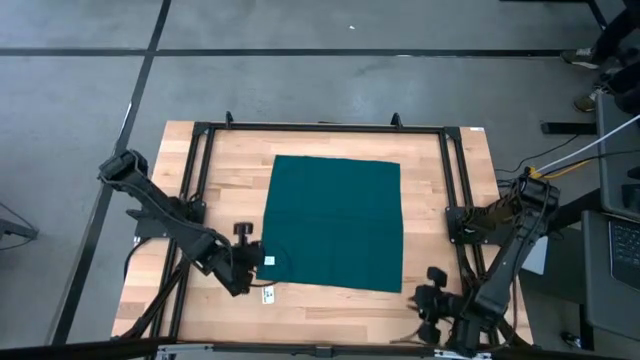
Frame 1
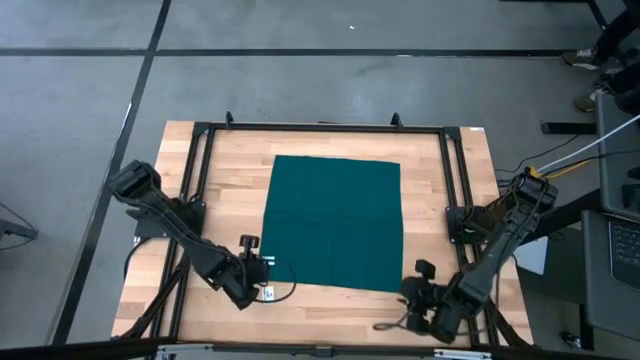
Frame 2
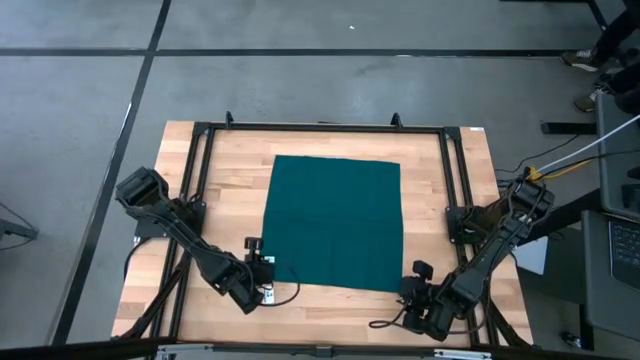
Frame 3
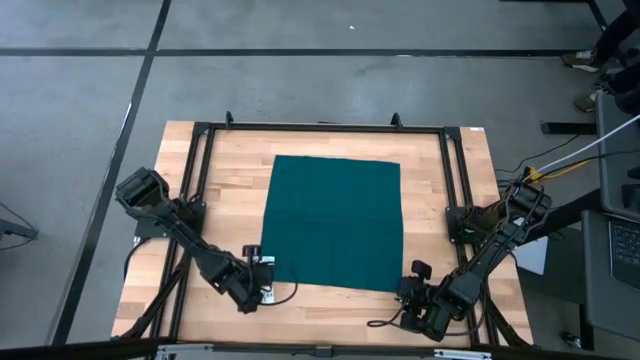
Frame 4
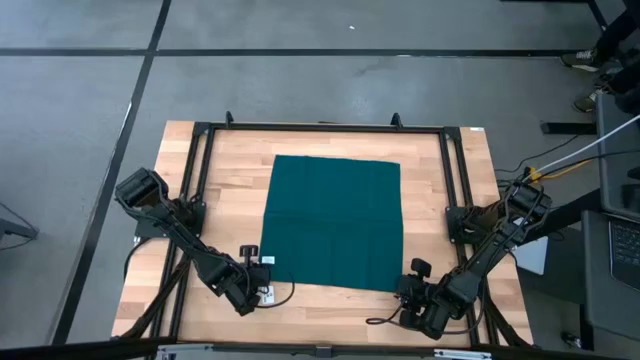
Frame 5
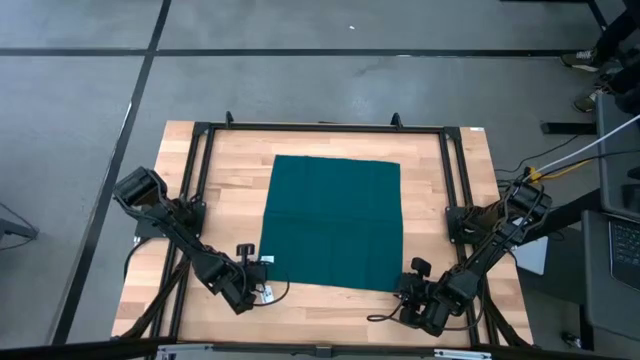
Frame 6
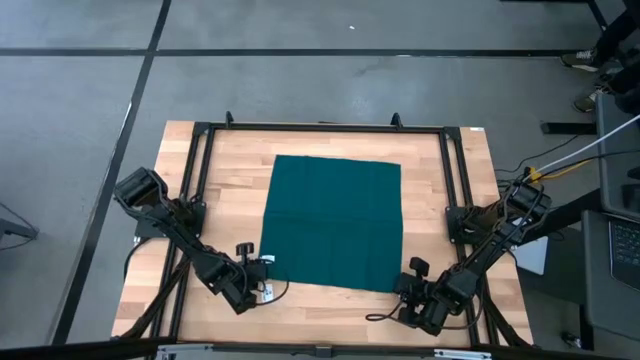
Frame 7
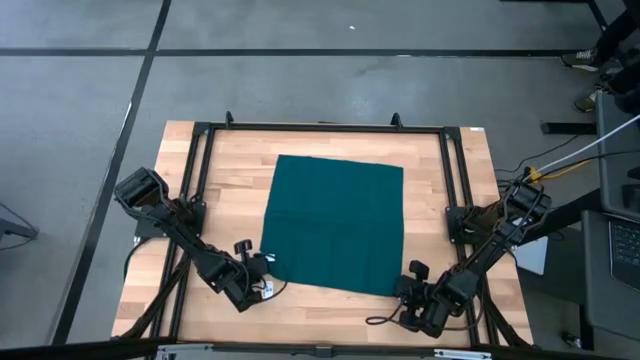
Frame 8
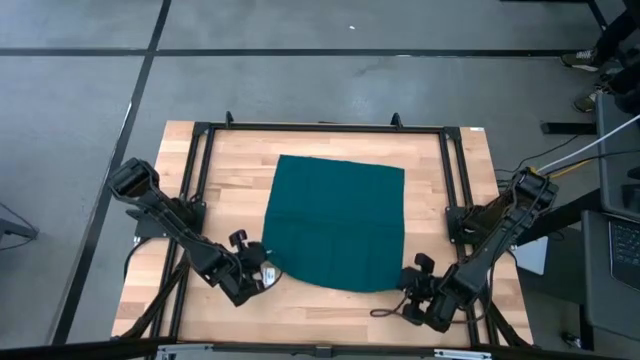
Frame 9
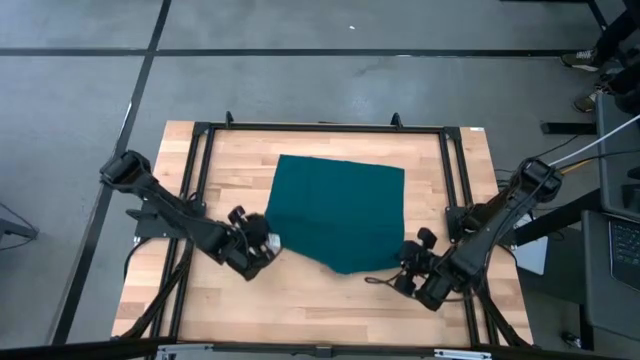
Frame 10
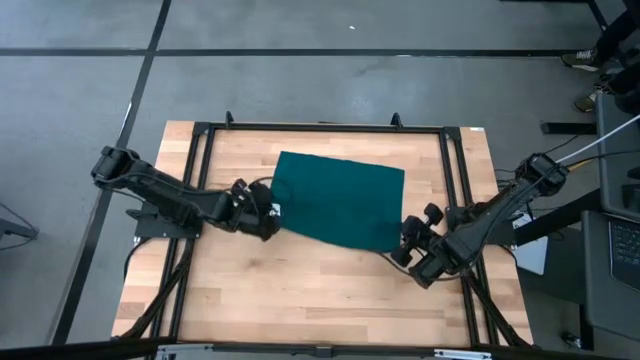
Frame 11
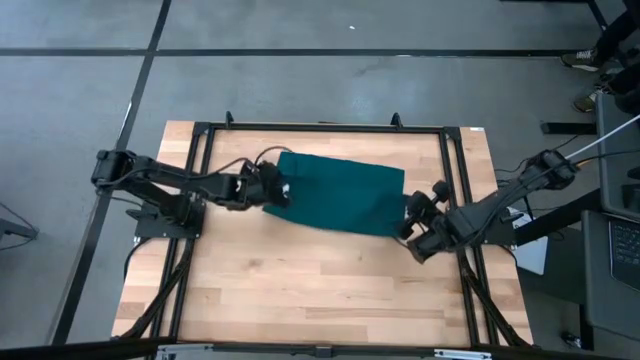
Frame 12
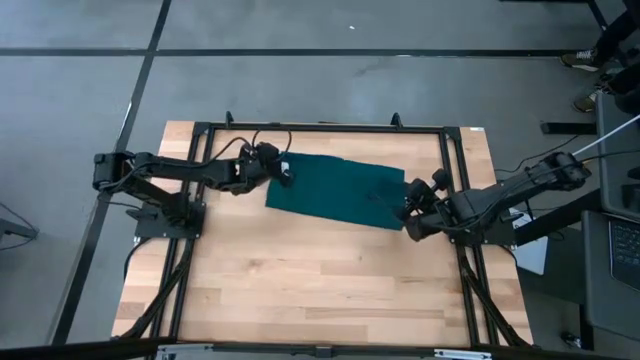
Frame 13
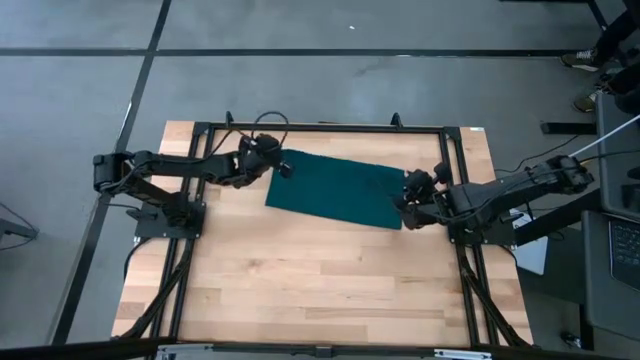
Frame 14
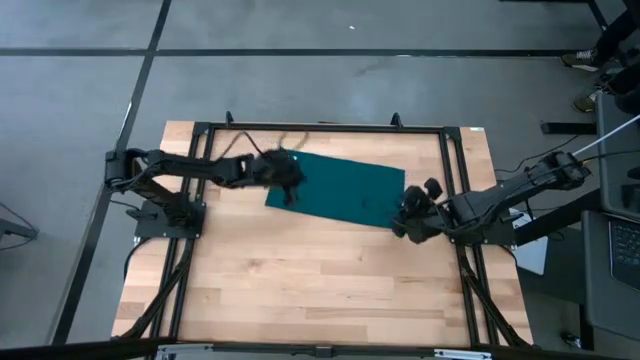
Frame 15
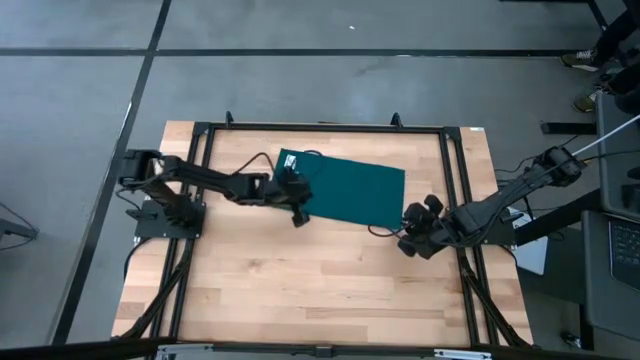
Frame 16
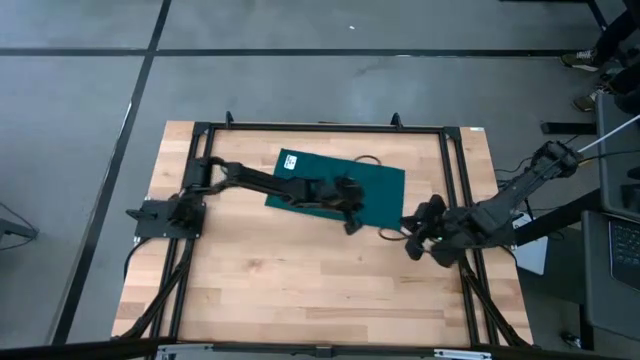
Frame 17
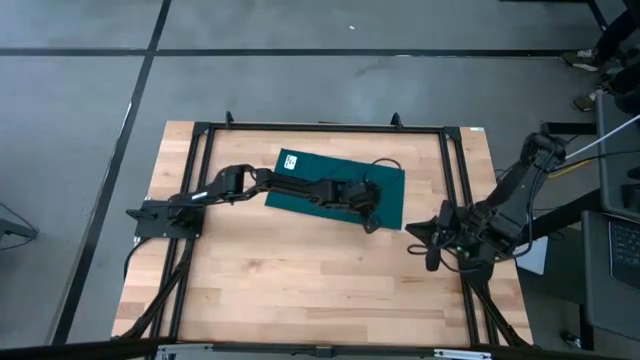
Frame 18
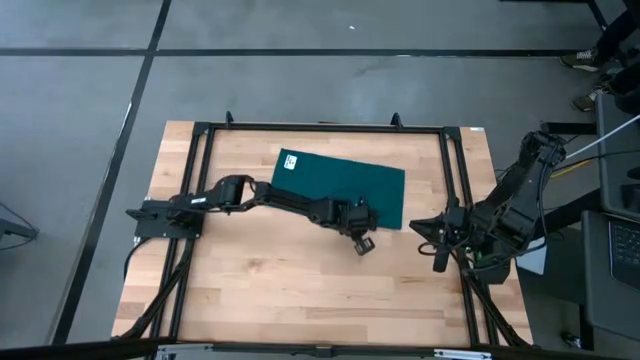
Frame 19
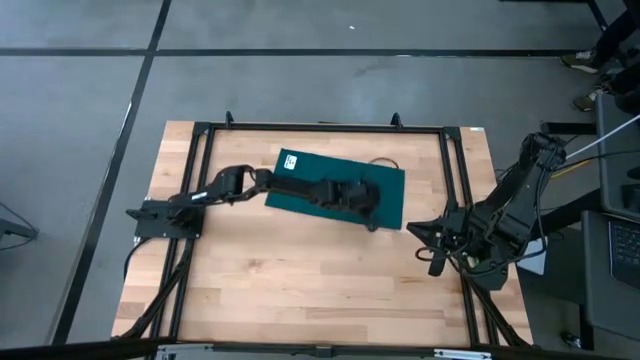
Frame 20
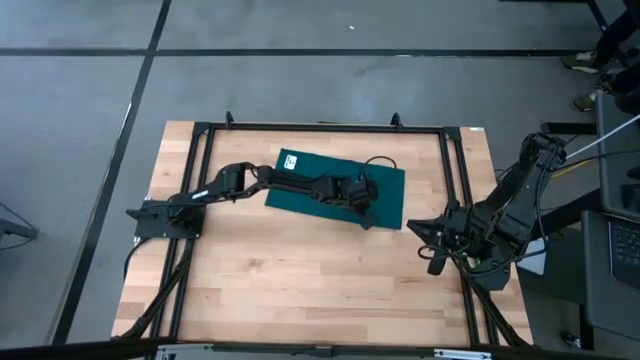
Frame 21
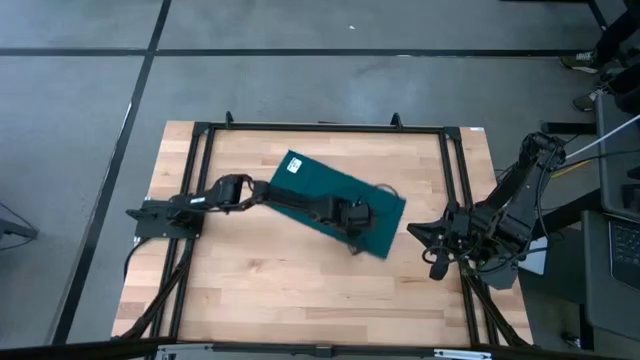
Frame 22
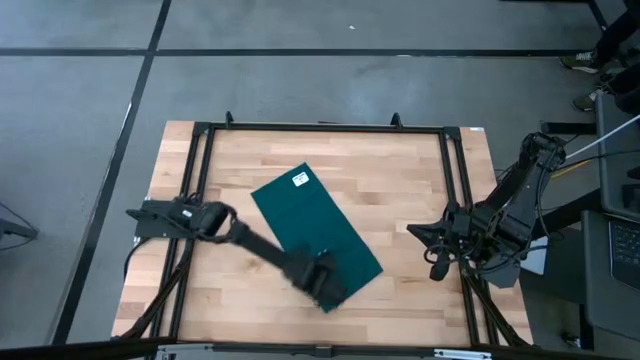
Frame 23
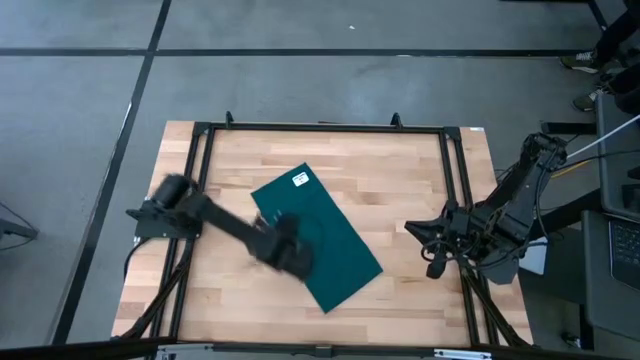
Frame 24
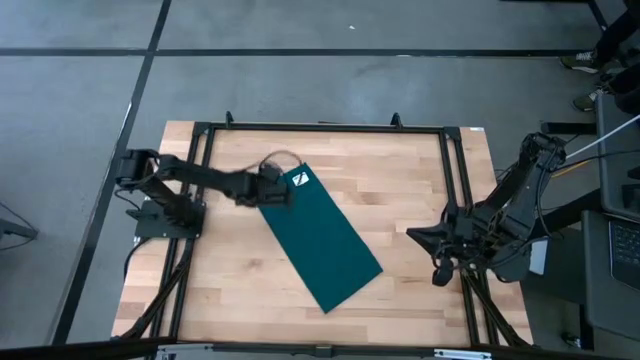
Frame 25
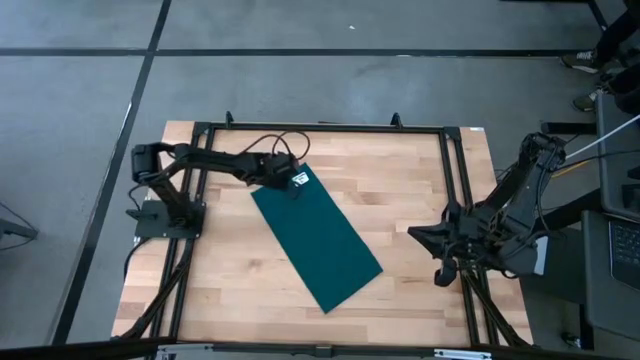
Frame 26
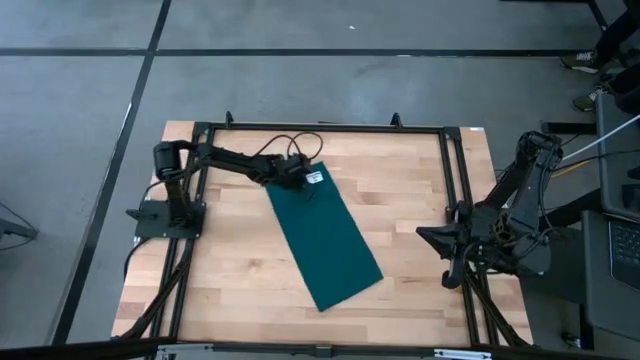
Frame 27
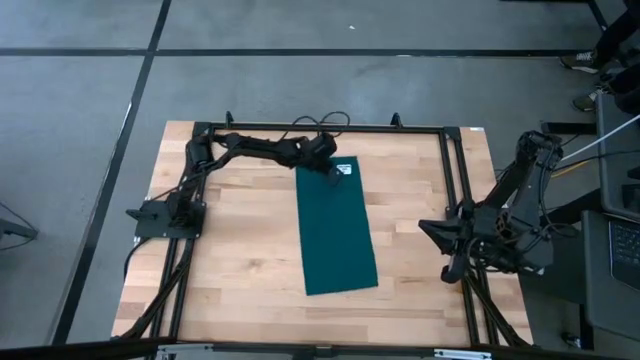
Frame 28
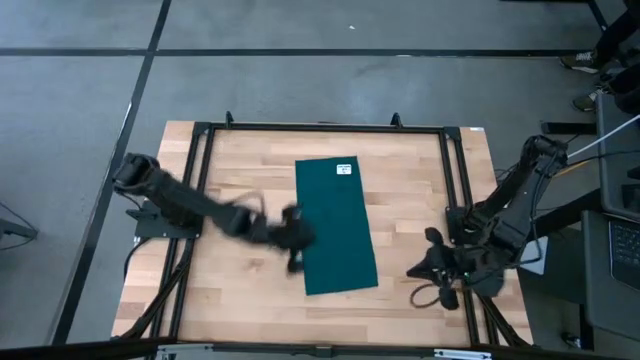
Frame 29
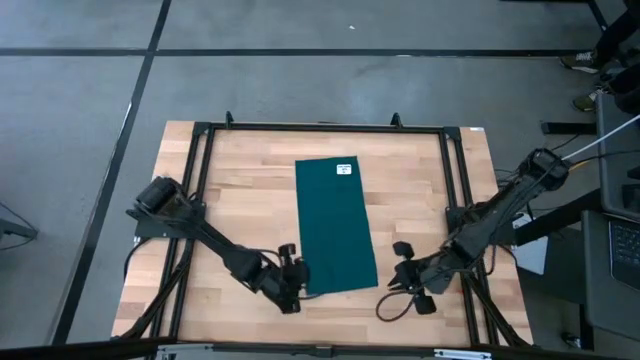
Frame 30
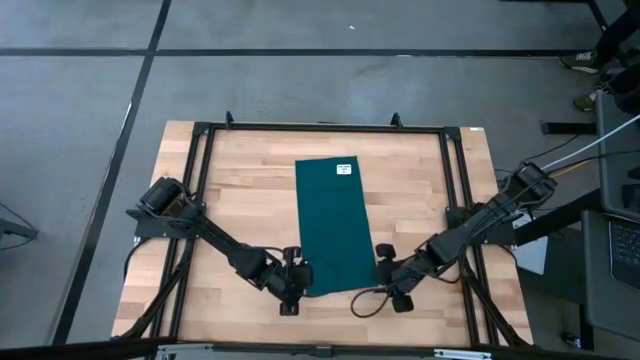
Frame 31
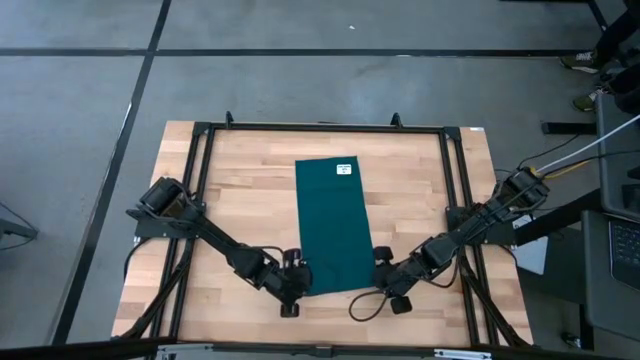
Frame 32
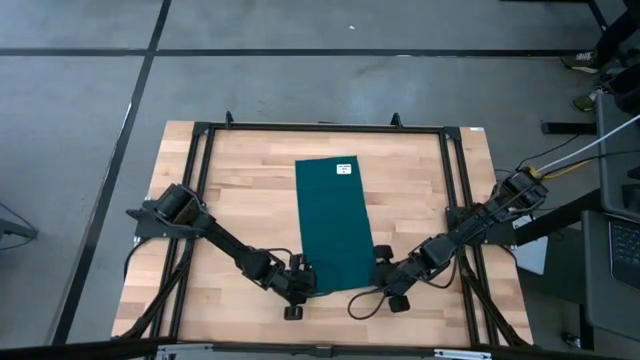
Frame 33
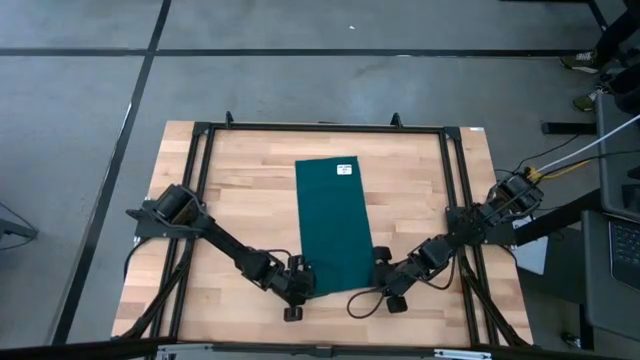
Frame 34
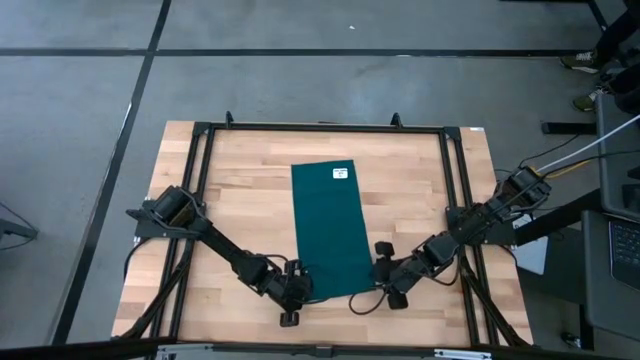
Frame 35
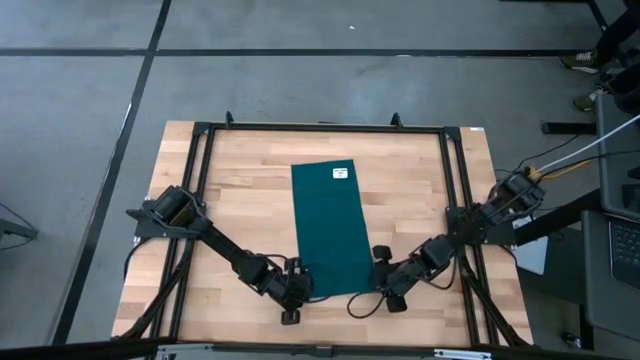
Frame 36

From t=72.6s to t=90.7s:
Task: Fold microfiber towels
Fold the green towel

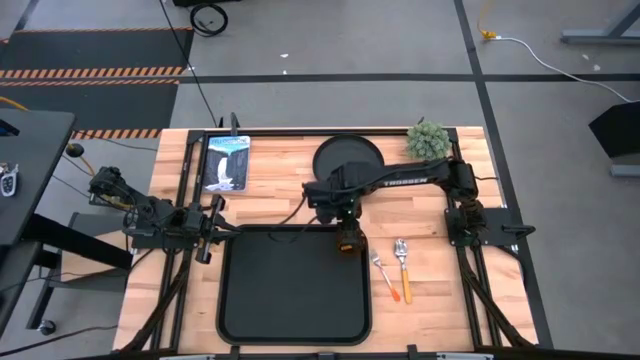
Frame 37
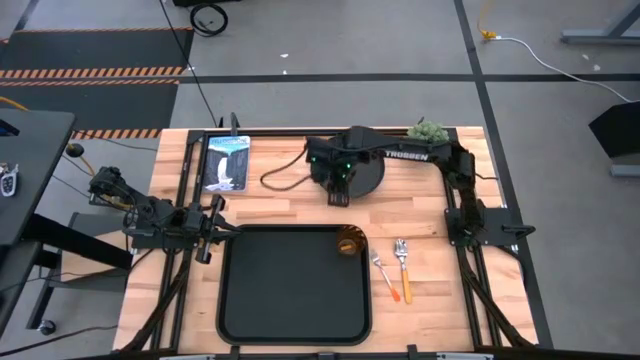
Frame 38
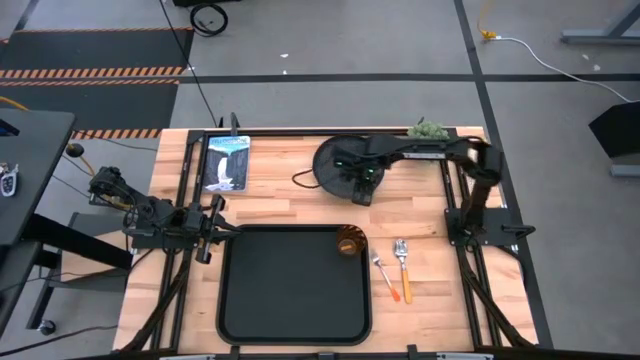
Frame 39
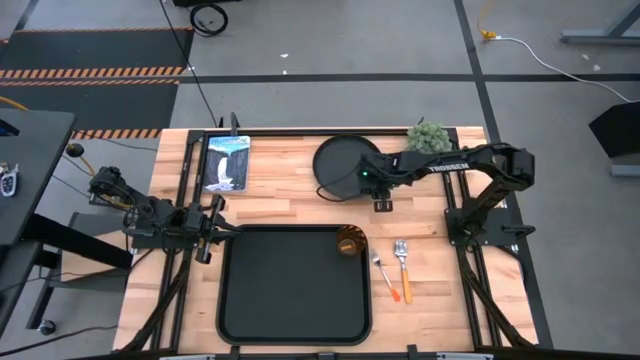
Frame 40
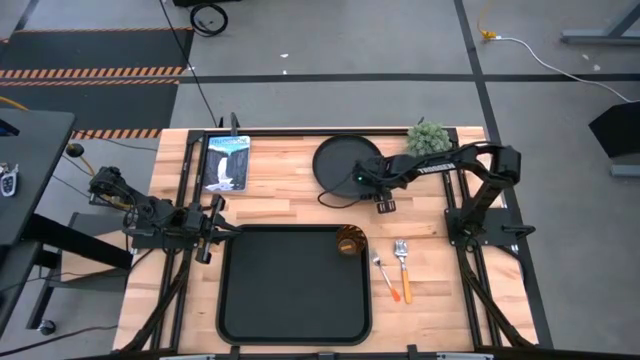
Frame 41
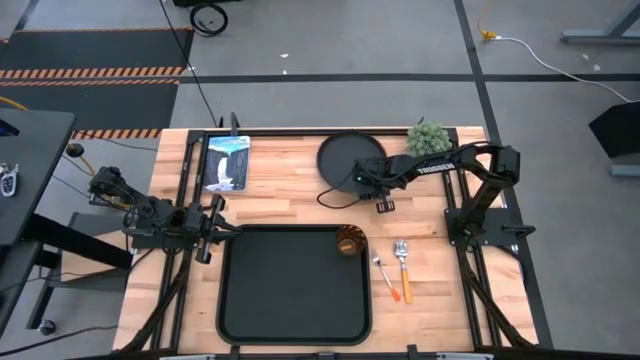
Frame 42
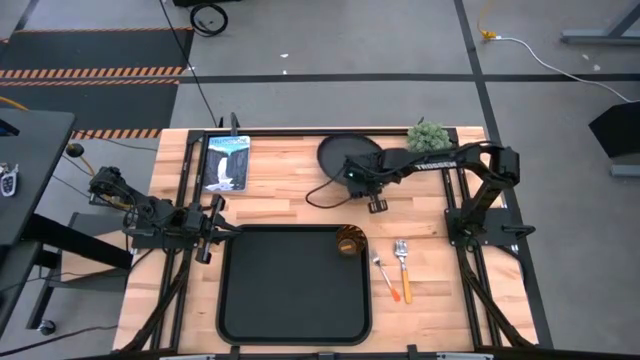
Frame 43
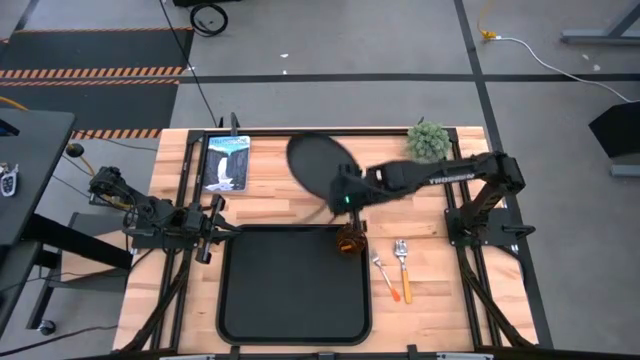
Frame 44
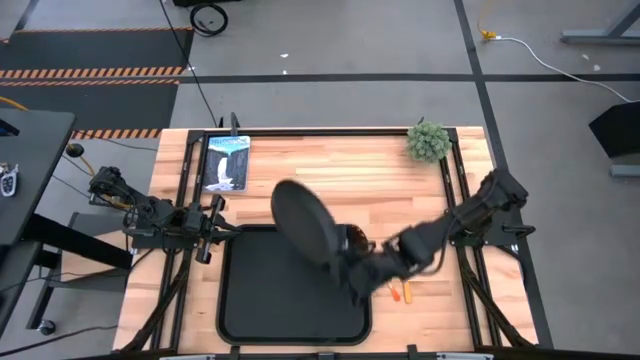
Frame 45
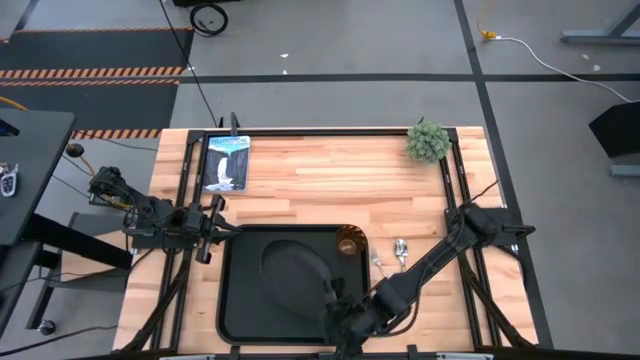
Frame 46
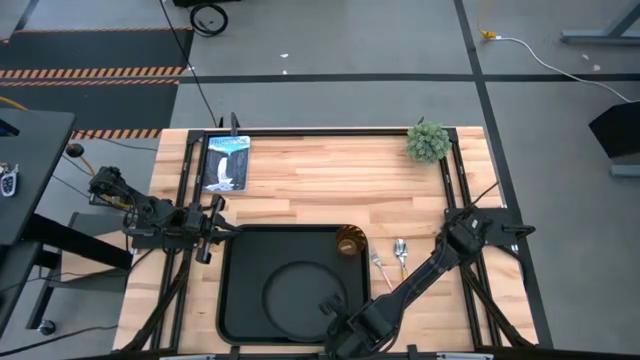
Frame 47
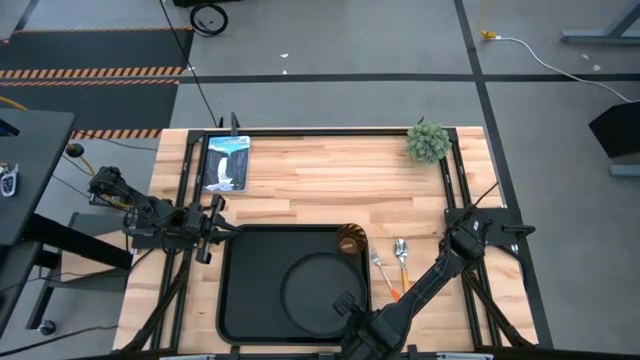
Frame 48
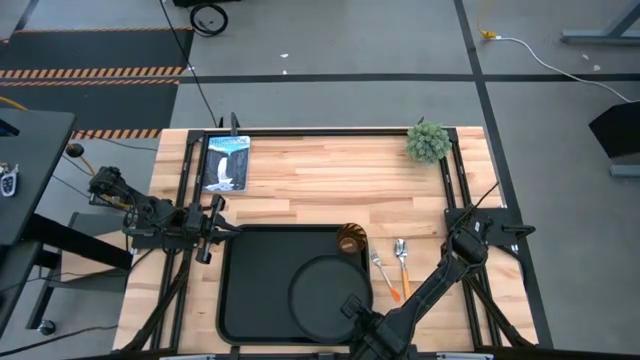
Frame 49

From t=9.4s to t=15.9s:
Task: Pick and place plate/cup/fork/spoon on tray
Put the black plate on the black tray
